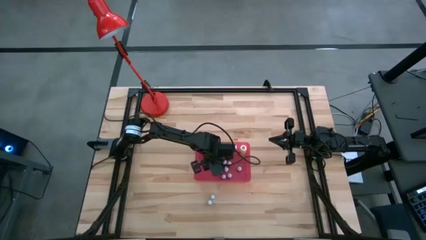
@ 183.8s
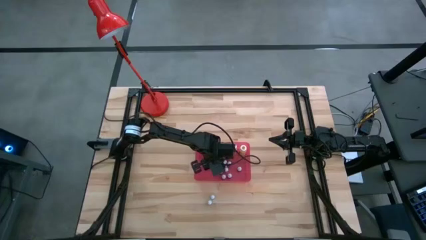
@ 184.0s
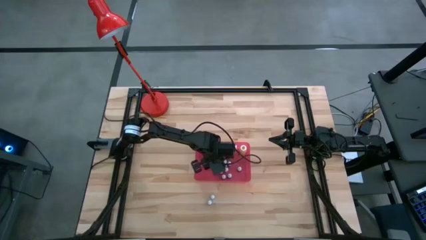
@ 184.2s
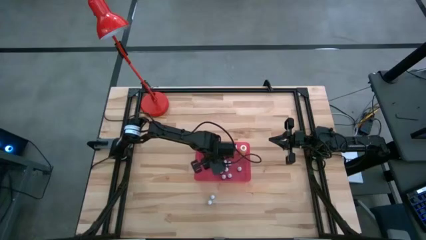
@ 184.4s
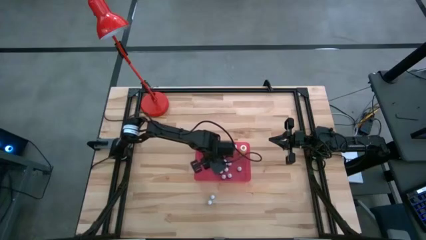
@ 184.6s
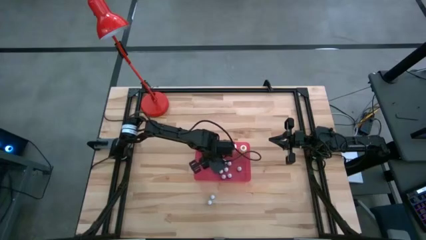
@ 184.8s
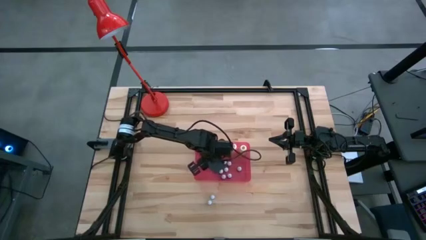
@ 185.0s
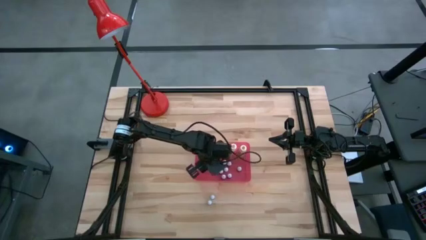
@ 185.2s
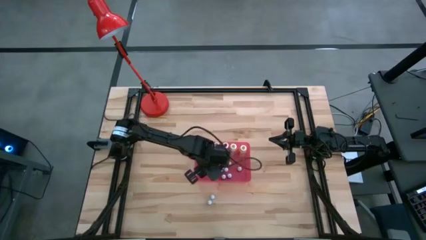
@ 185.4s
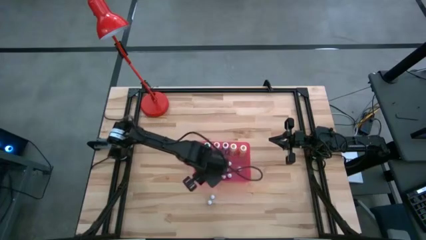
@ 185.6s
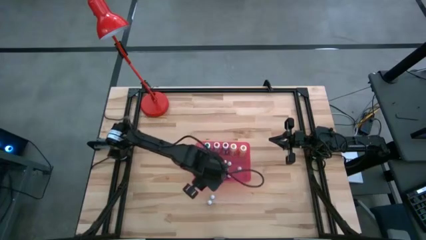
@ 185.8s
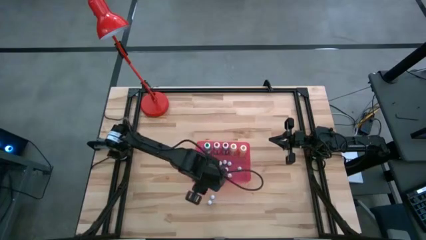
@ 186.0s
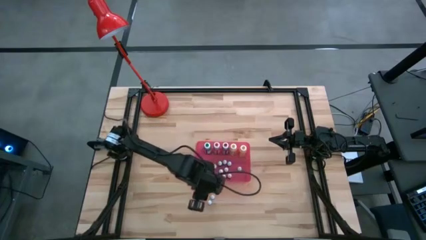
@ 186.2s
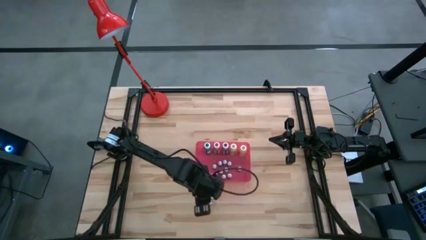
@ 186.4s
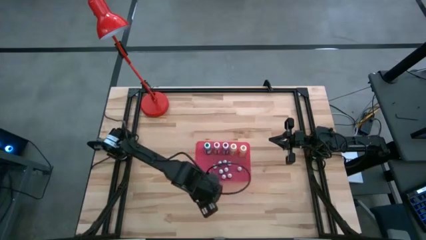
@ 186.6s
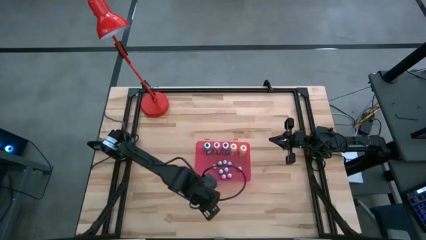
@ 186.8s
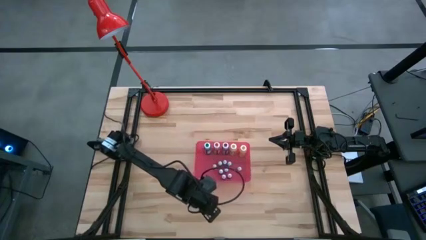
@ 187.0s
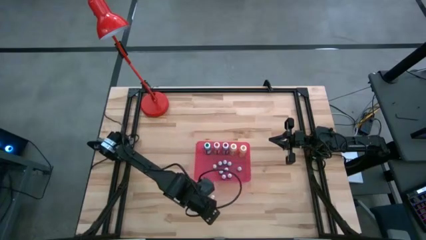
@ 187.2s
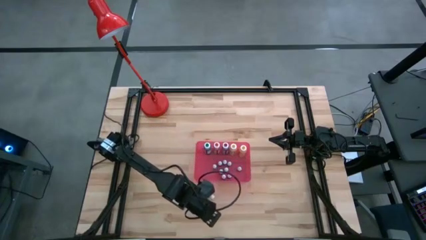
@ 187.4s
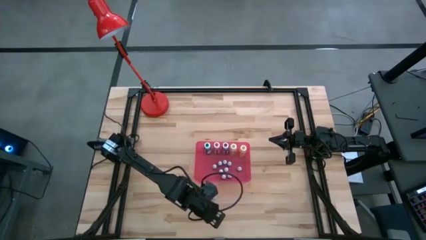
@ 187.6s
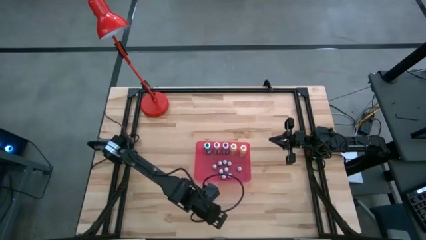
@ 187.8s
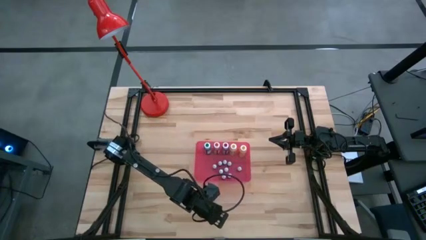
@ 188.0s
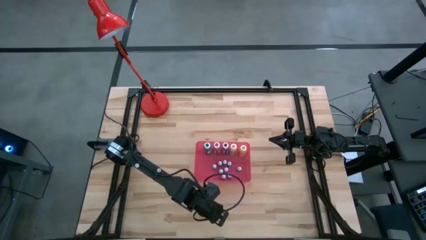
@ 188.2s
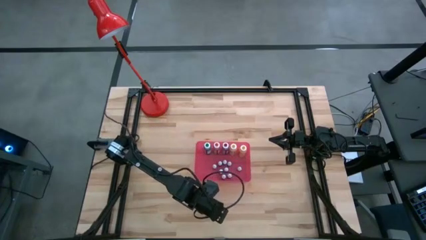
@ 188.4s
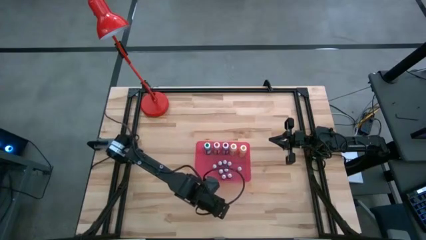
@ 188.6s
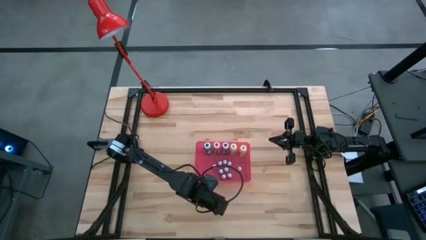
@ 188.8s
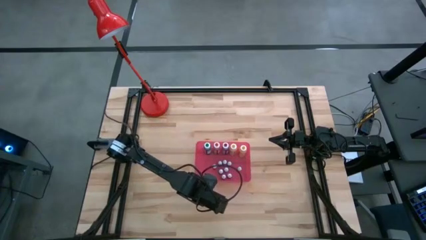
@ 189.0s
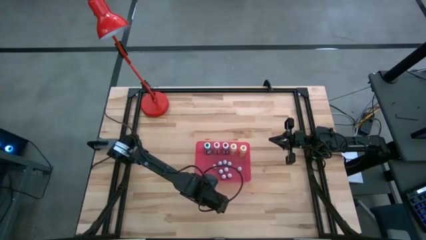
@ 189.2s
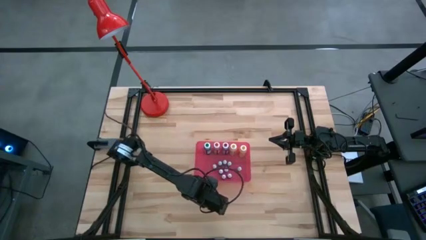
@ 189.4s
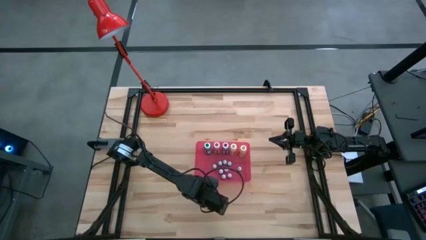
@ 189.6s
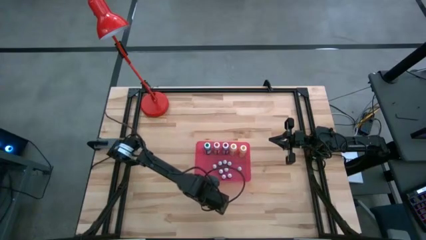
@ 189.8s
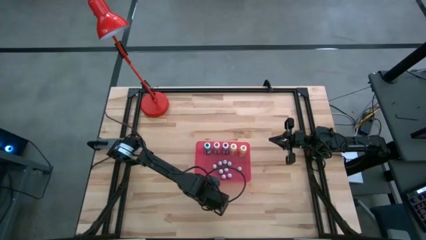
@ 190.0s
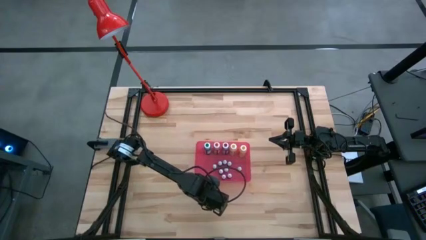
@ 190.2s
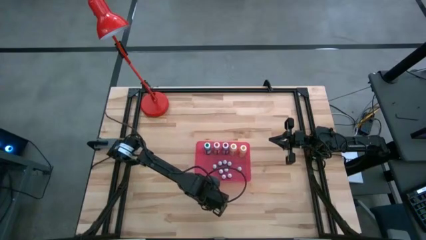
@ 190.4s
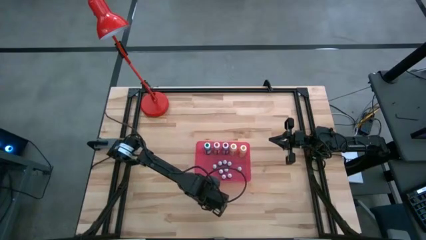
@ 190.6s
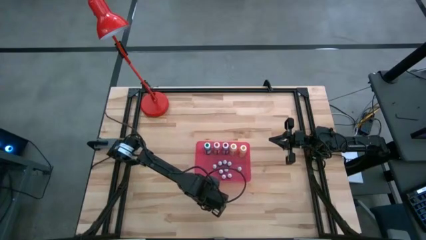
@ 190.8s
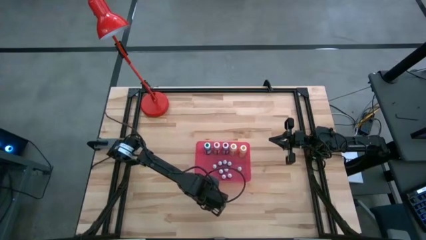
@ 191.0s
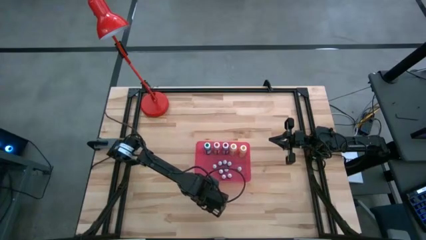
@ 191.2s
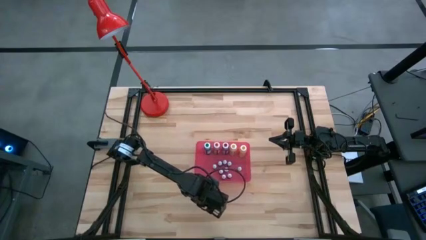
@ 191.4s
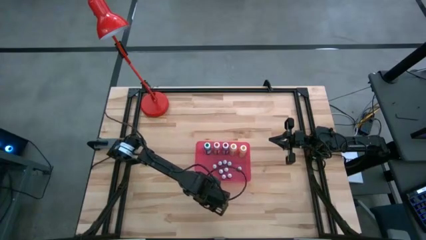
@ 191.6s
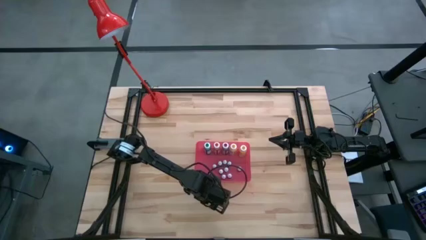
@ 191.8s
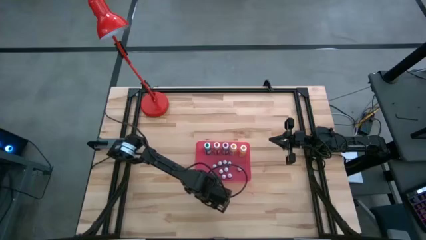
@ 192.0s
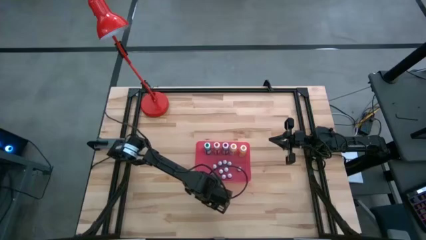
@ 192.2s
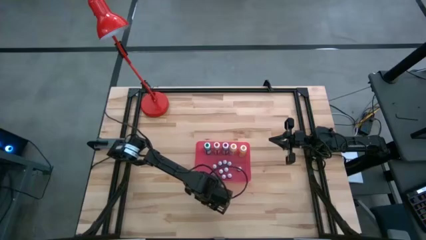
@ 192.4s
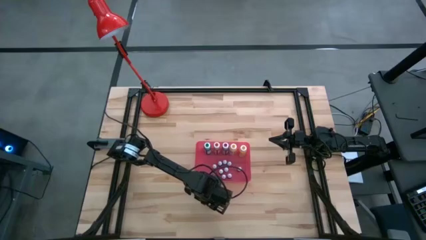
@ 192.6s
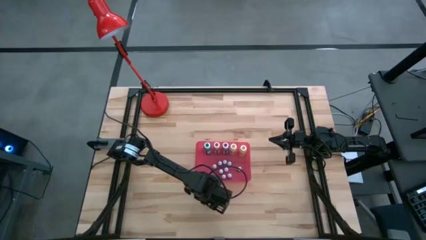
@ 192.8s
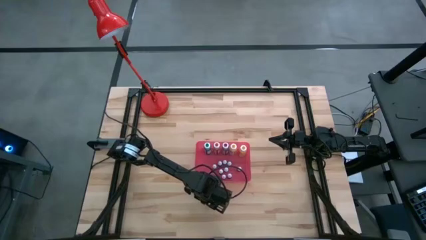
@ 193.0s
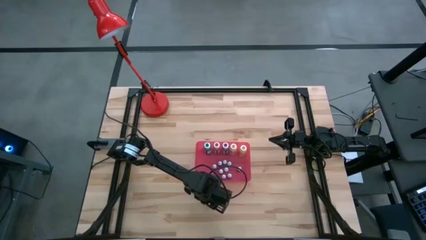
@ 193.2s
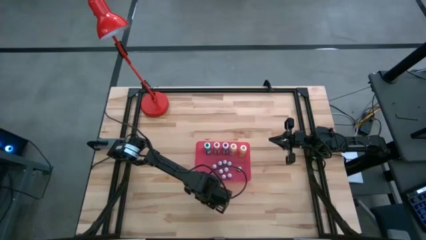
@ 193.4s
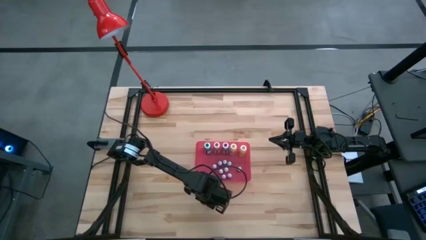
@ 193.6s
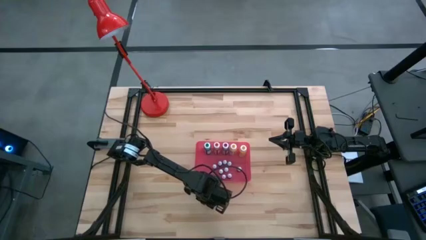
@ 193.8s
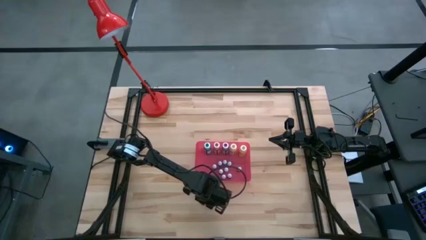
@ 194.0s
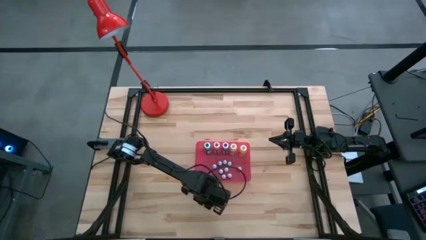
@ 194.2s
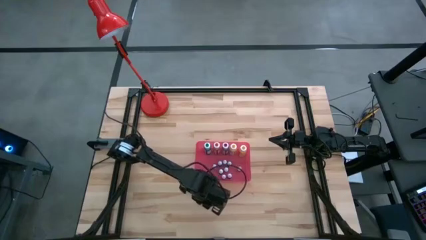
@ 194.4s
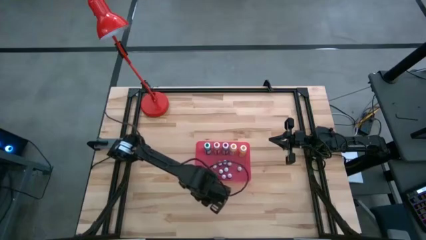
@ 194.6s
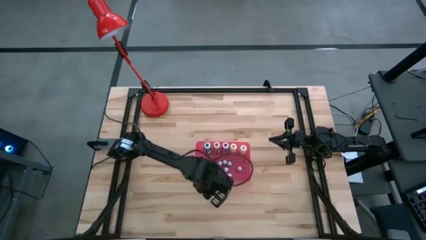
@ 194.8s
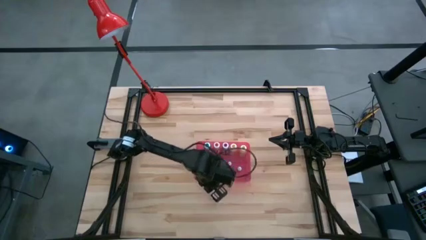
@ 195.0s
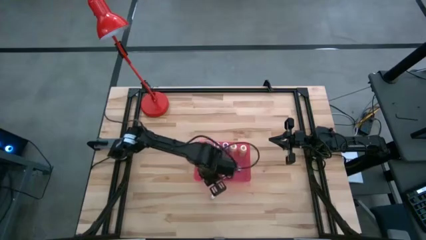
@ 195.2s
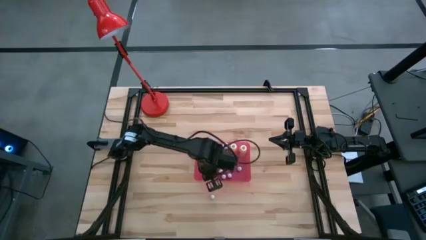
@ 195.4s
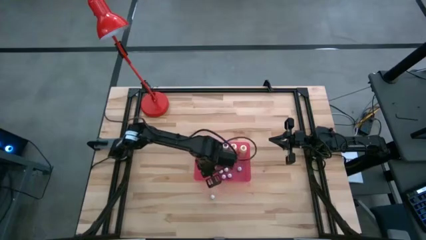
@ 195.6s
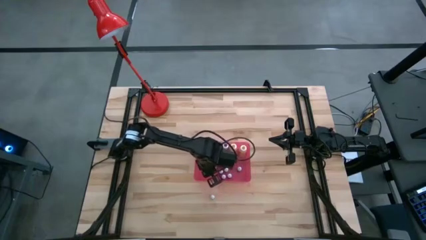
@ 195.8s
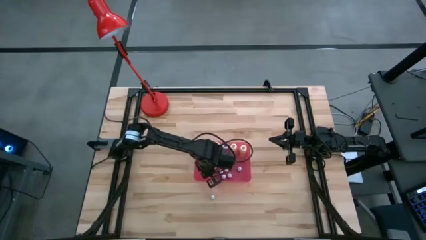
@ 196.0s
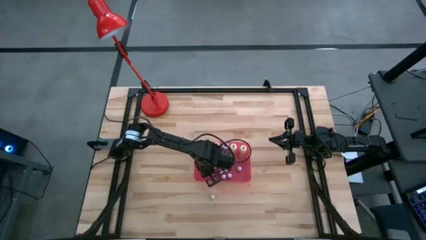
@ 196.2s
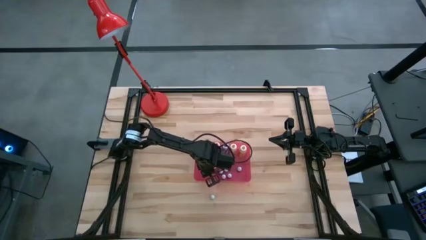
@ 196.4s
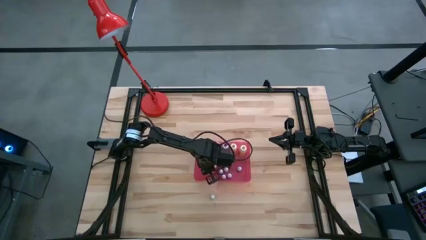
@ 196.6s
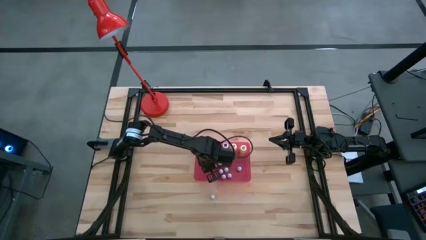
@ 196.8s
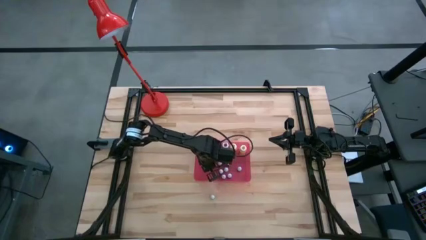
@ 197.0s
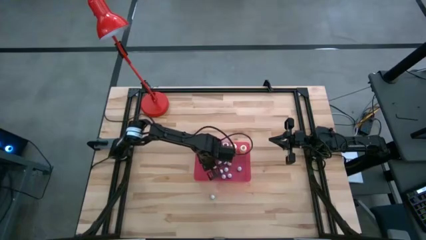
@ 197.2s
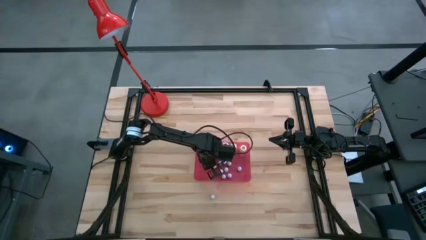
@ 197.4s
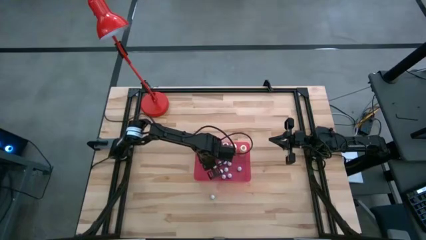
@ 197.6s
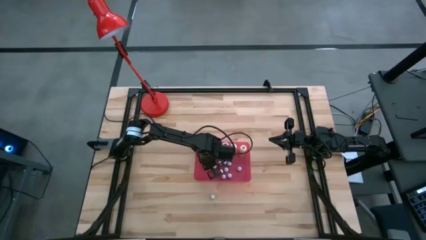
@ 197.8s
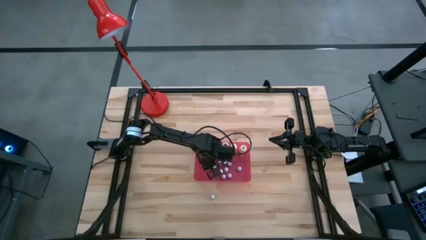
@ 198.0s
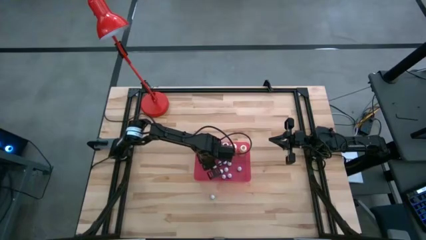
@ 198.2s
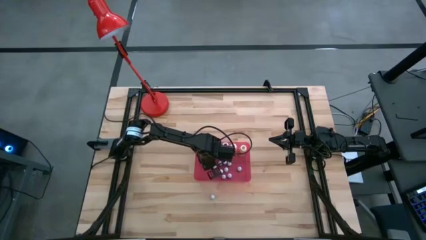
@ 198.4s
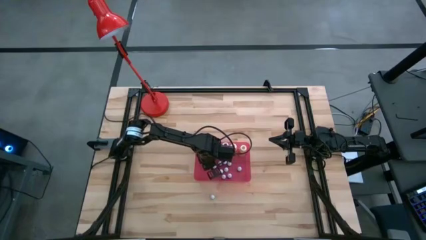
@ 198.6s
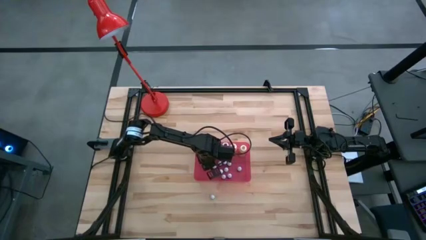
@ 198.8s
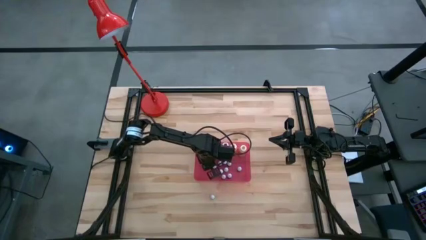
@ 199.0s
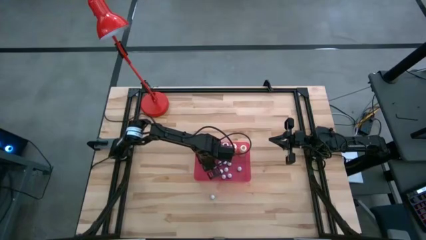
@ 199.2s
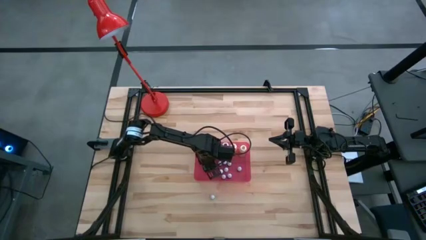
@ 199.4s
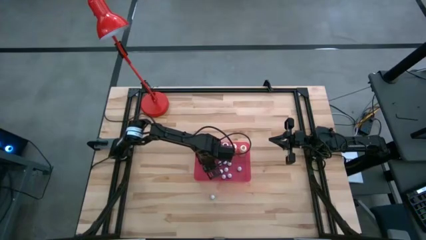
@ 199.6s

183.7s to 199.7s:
Task: Pick & Place food coloring
Put the small green food coloring bottle into the container

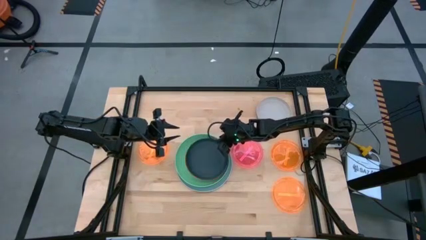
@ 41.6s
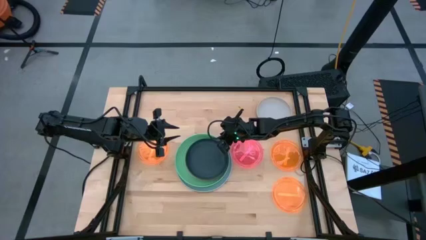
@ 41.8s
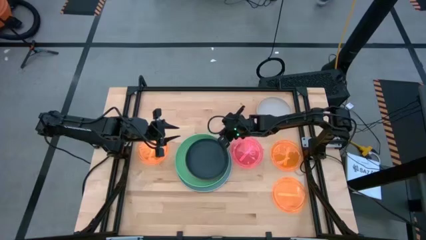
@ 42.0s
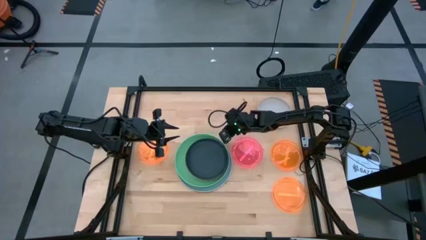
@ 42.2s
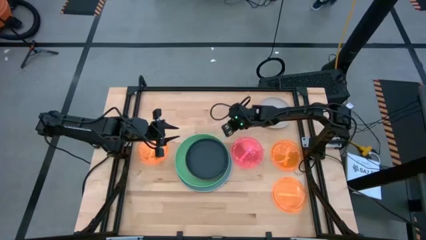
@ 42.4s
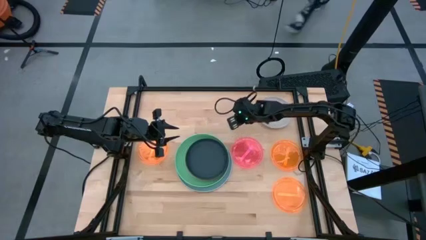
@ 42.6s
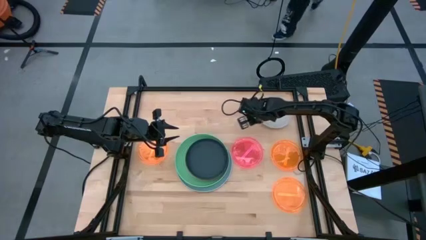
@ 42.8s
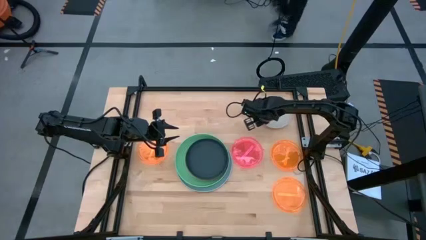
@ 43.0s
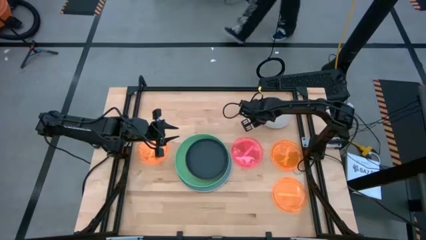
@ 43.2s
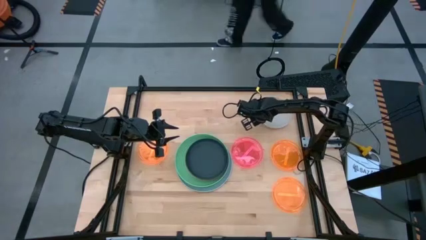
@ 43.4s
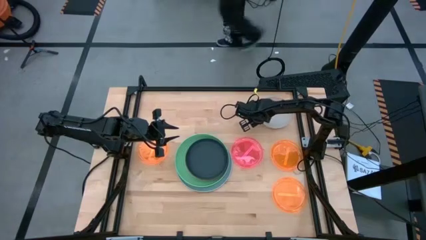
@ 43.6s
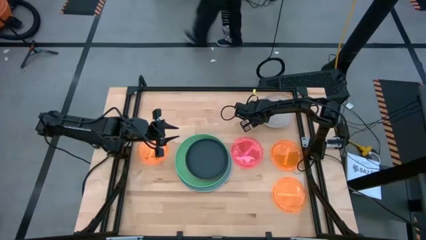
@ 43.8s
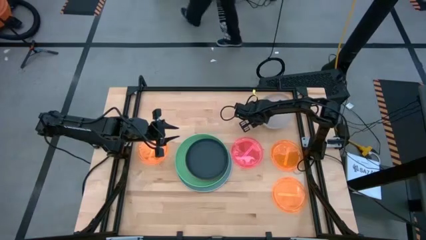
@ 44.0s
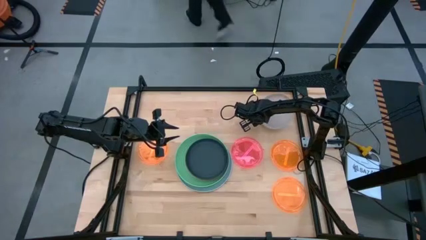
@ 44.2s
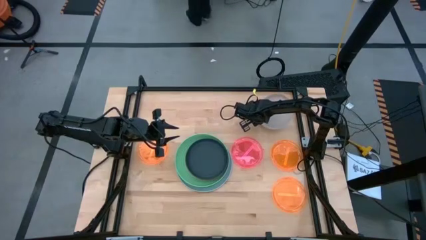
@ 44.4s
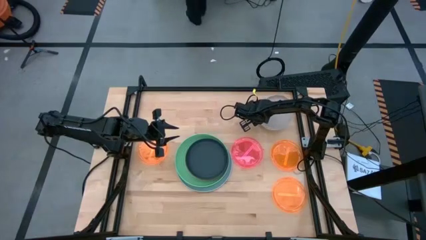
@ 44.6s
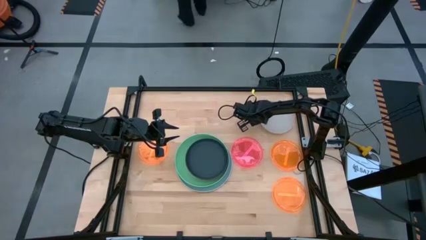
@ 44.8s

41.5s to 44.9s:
Task: Stack plastic plates
Stack the white plate on top of the dark blue plate
